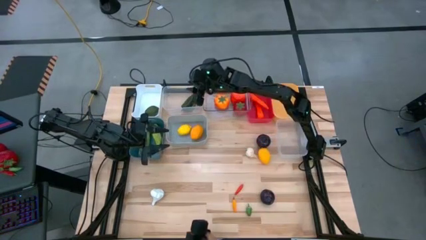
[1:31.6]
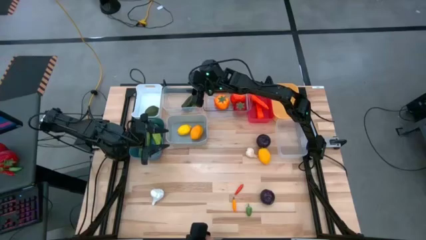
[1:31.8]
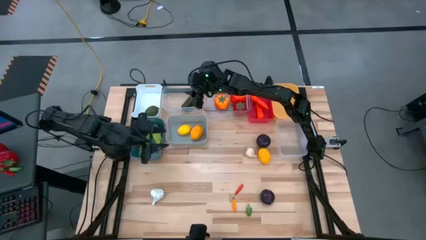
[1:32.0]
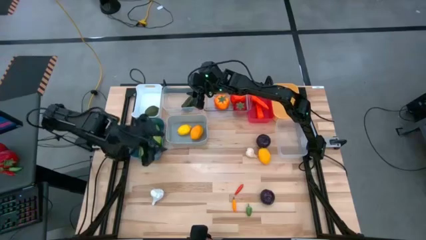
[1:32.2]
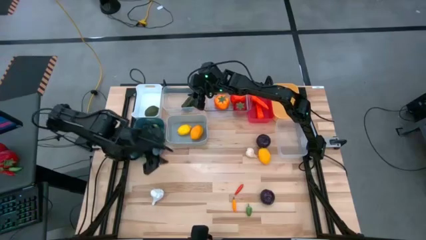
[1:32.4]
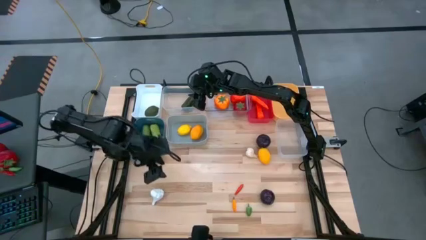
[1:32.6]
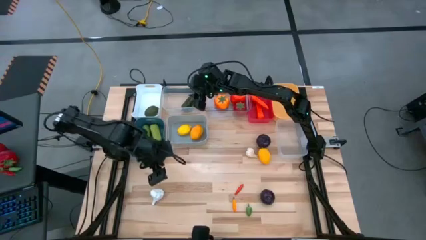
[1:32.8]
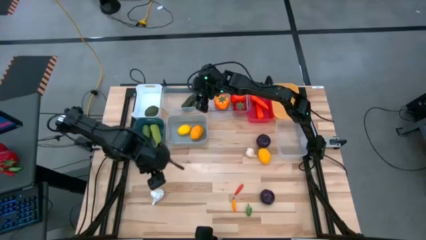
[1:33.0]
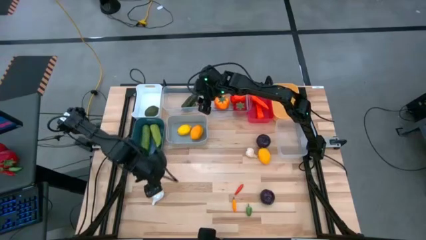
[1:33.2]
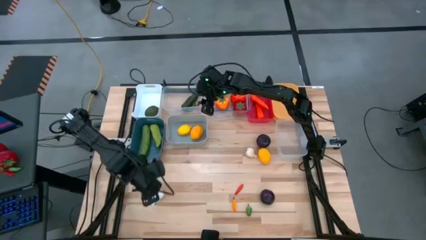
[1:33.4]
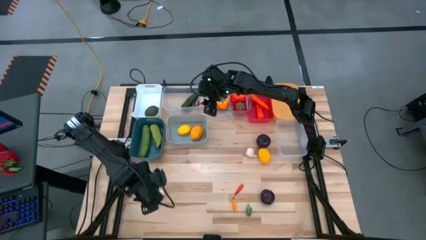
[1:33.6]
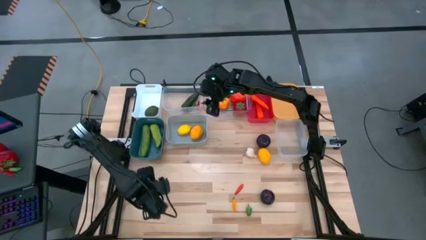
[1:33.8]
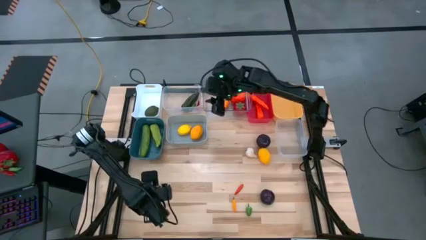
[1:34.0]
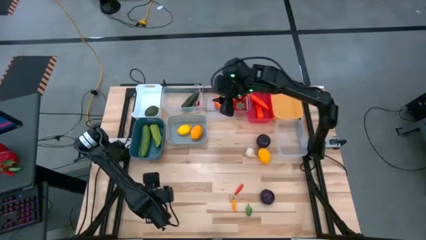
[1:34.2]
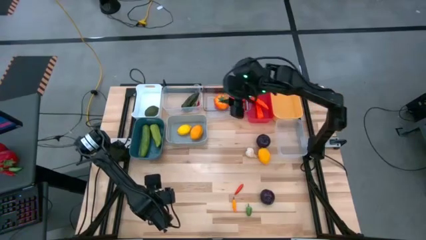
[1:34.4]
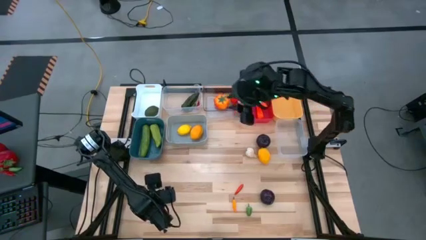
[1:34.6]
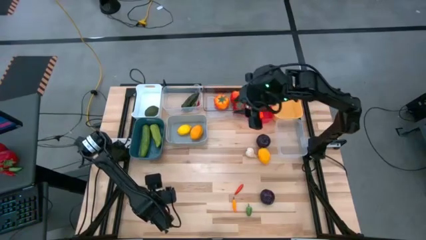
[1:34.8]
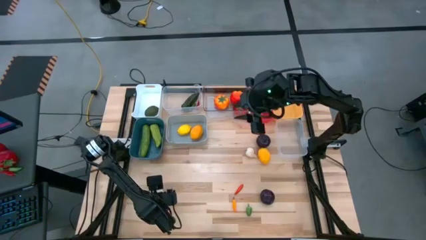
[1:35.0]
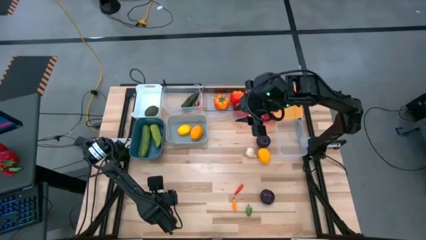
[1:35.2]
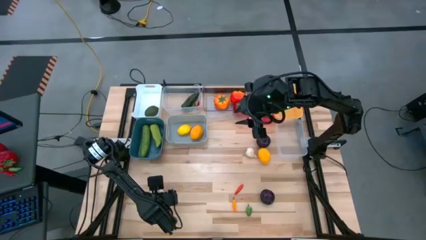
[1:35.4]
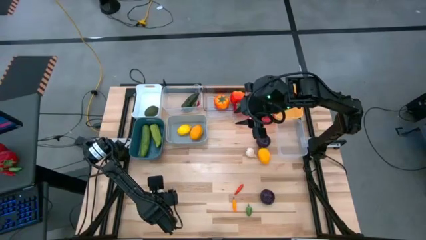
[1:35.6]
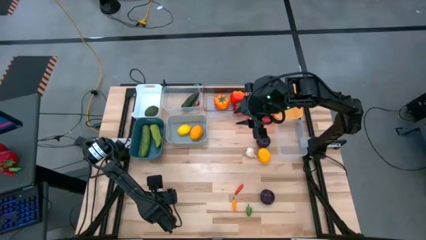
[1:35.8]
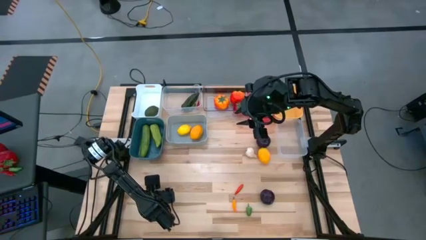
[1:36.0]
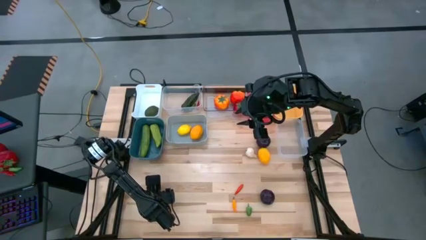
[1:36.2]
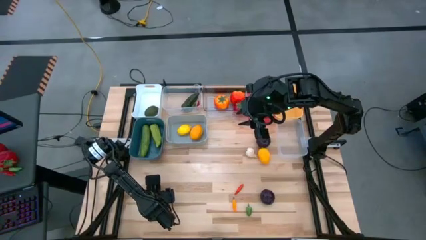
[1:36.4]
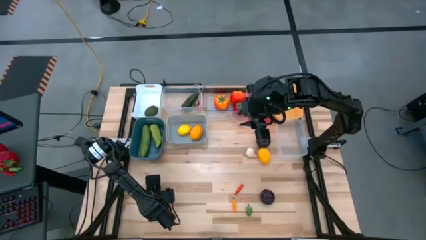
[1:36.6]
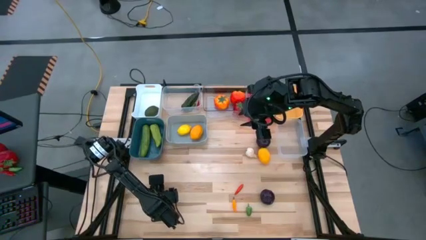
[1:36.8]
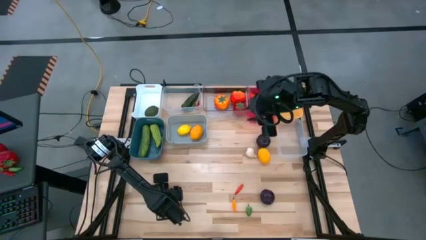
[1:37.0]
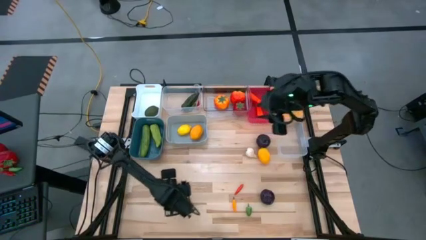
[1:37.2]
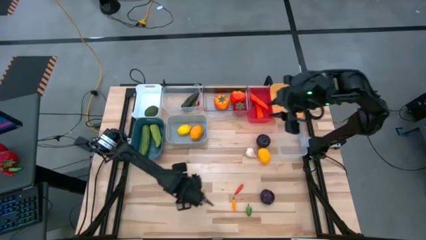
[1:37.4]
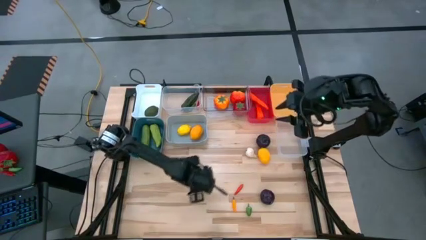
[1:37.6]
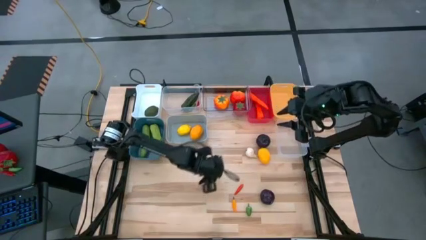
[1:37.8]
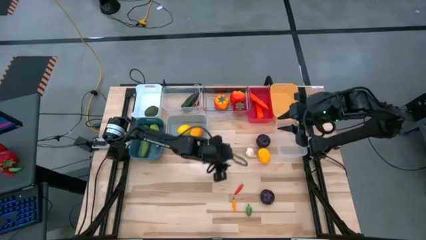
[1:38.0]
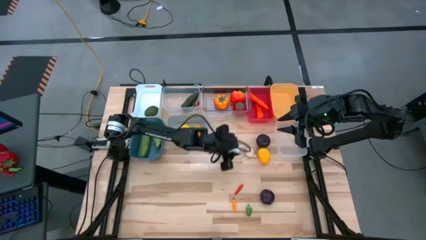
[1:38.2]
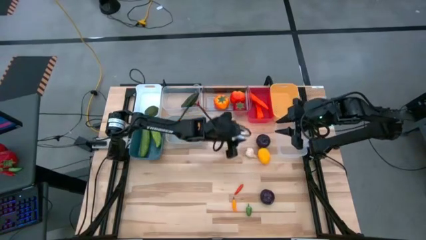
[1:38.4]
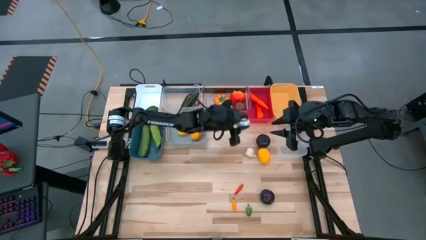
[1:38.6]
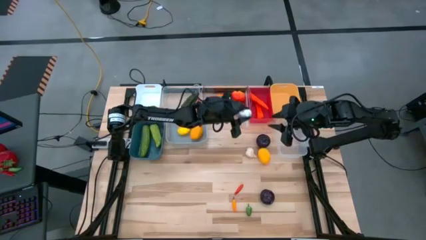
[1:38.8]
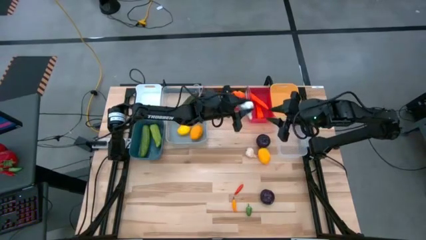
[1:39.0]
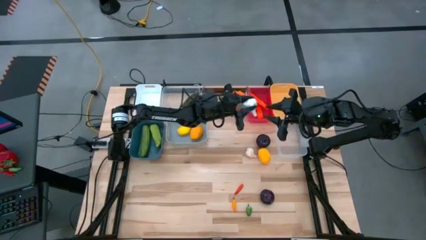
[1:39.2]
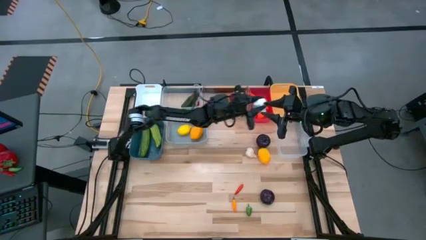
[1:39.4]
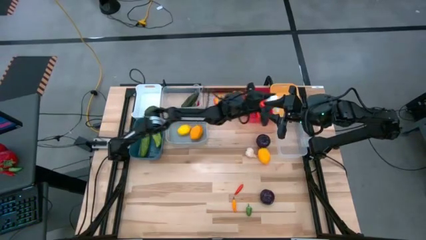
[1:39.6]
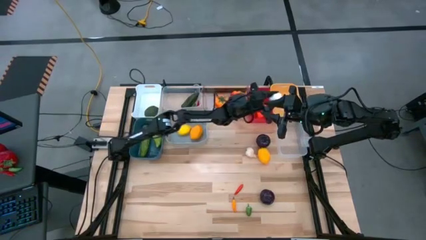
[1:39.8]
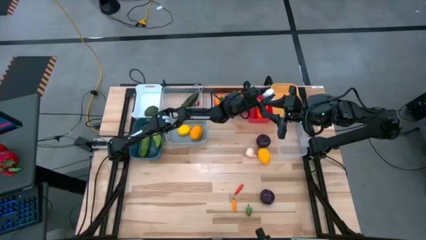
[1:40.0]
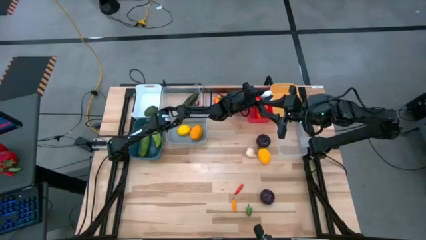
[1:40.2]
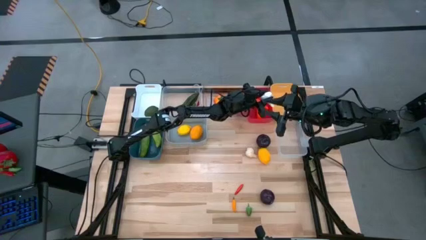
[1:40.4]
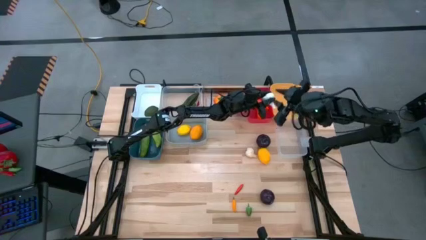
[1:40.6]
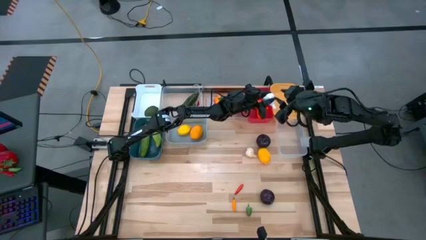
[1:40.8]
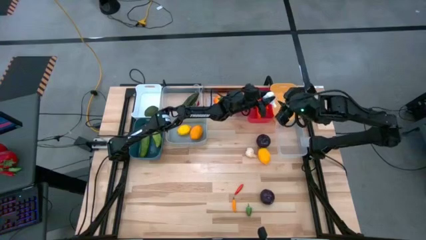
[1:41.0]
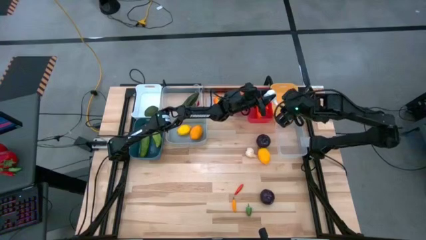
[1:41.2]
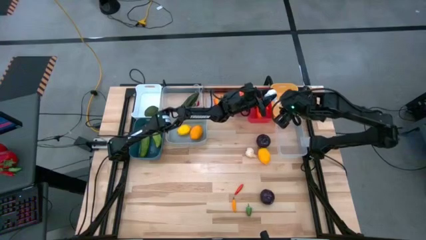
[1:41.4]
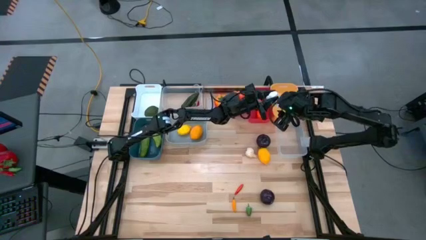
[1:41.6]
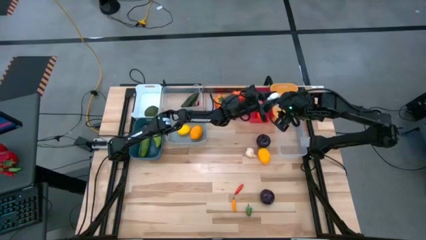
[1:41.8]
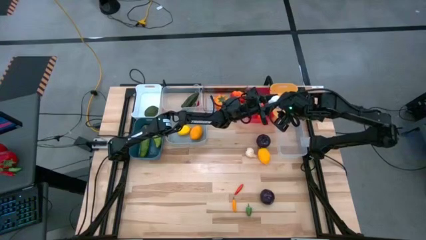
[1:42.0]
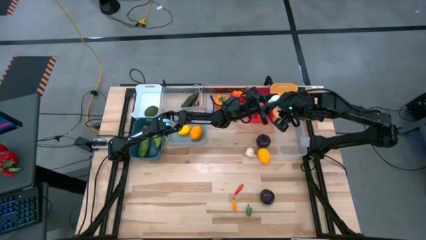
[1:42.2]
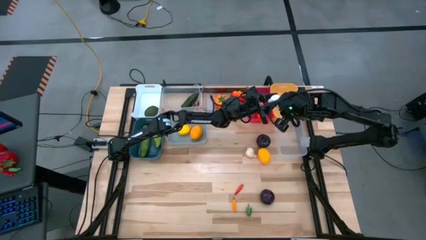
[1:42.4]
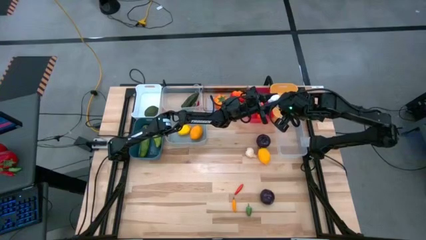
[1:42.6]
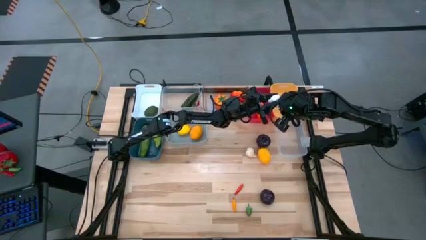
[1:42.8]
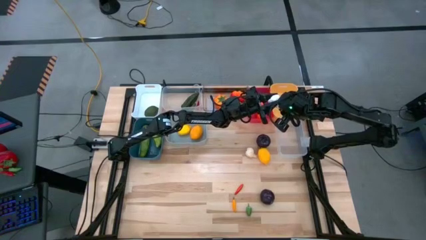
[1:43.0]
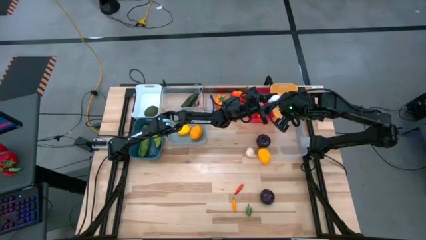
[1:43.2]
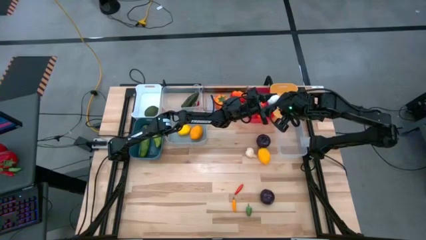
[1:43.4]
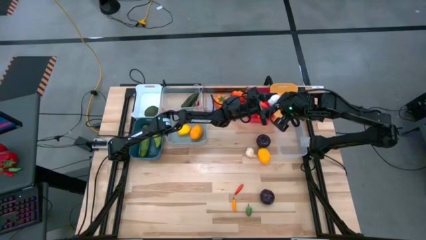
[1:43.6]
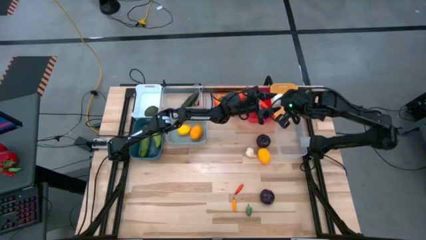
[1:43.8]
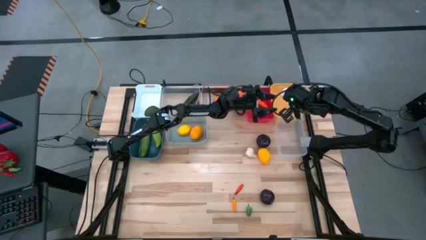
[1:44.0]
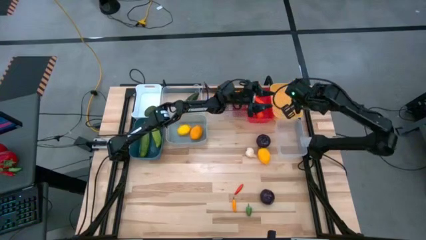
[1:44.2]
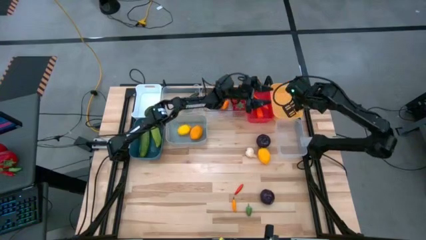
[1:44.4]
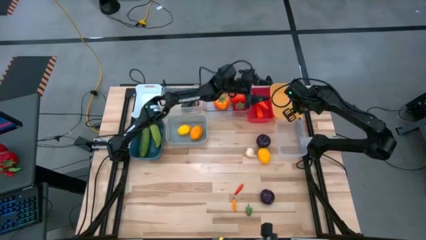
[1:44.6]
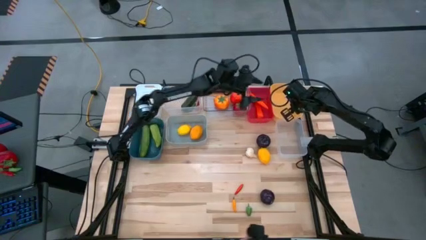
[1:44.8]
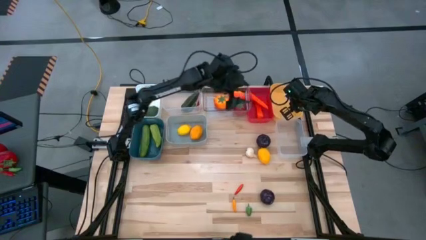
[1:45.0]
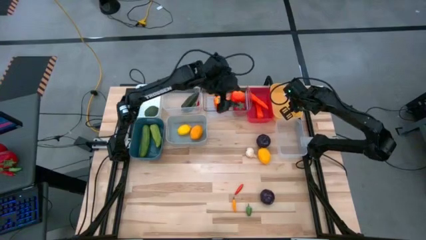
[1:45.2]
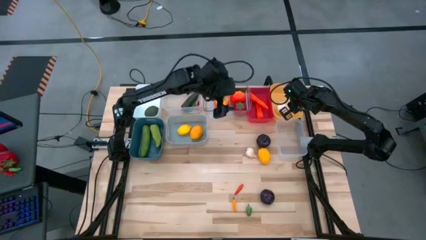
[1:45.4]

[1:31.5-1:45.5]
Task: Sort produce into baskets
Put the bottom white garlic into the yellow bin

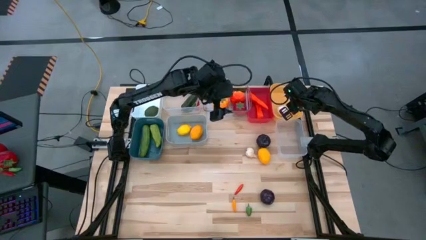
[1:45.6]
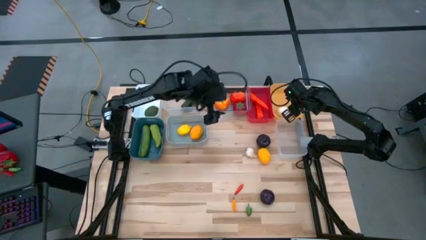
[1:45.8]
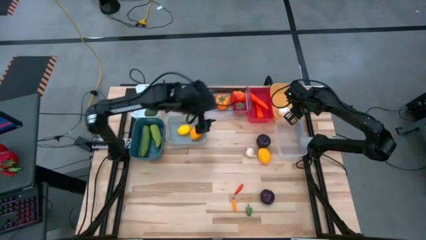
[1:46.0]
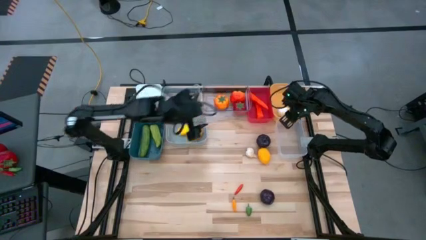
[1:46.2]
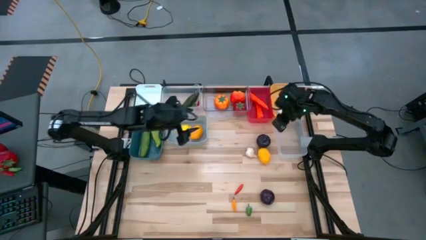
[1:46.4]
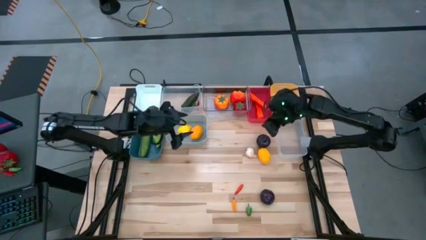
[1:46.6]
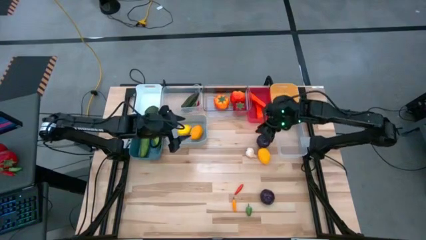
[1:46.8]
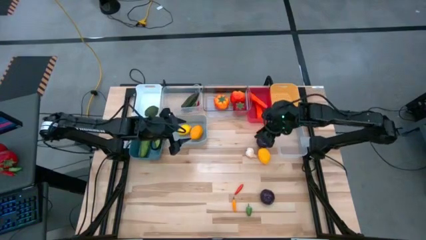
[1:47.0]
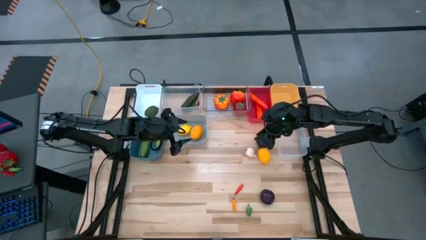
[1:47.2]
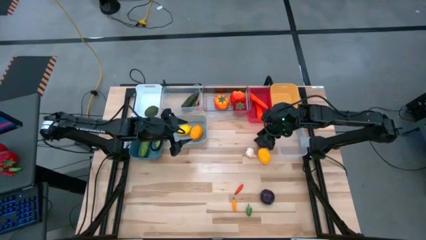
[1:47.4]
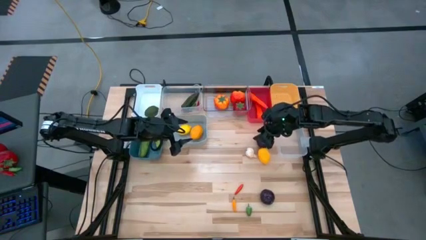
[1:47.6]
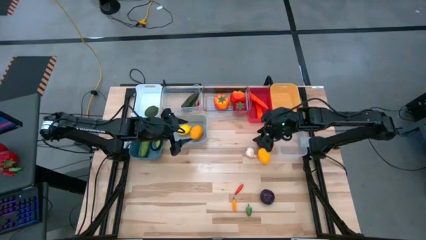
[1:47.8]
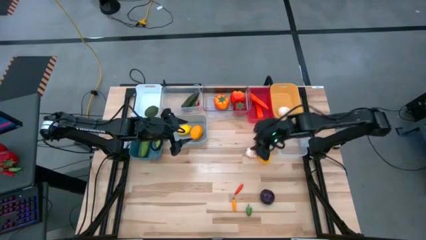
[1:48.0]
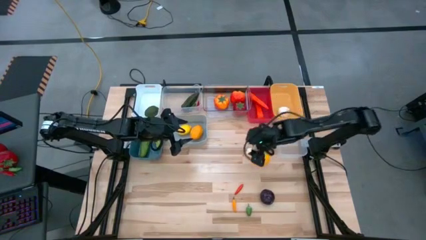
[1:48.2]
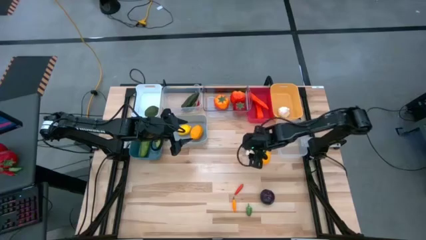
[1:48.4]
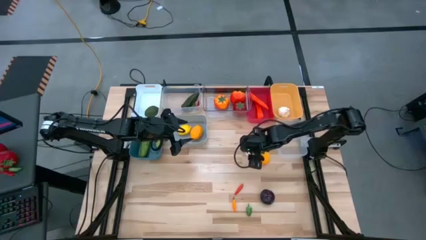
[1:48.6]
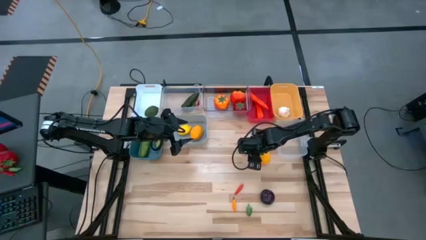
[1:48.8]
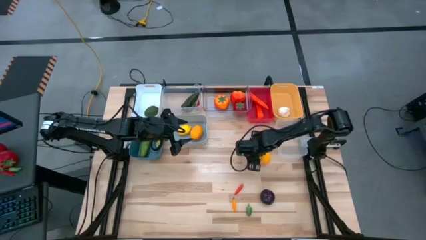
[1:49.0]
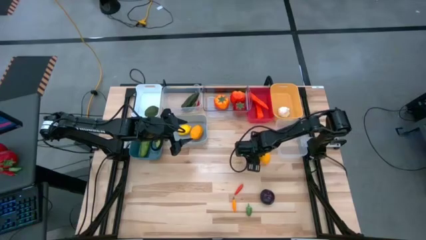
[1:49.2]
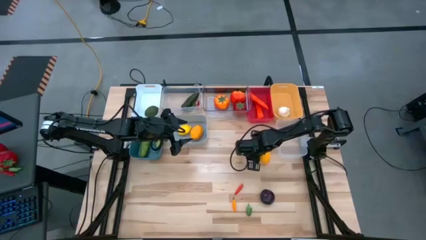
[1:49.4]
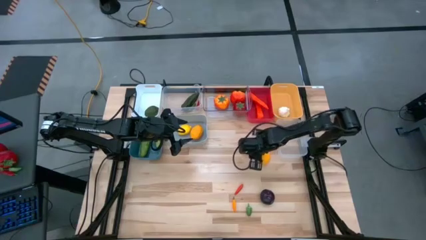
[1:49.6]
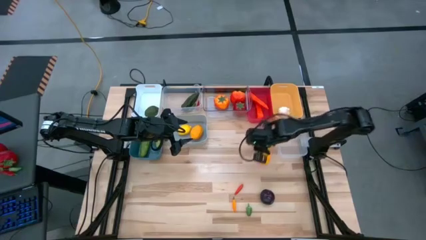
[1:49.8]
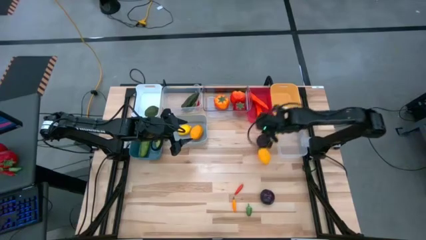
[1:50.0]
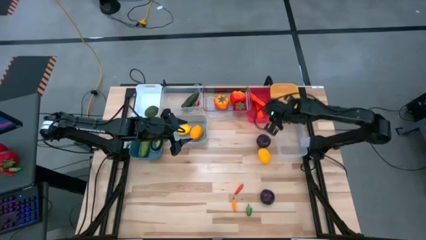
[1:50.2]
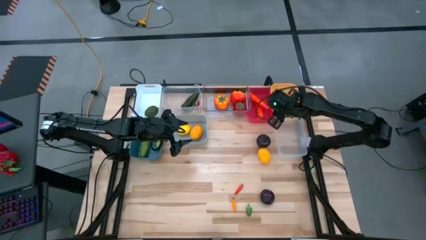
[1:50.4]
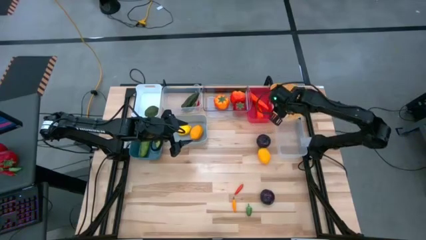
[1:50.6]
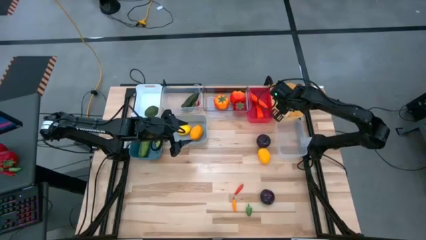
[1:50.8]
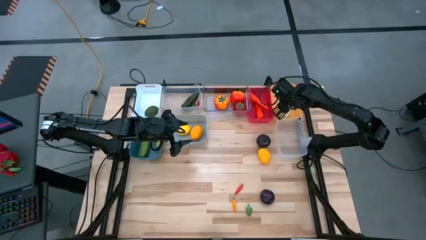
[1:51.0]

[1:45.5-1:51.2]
Put the white garlic into the yellow bin
